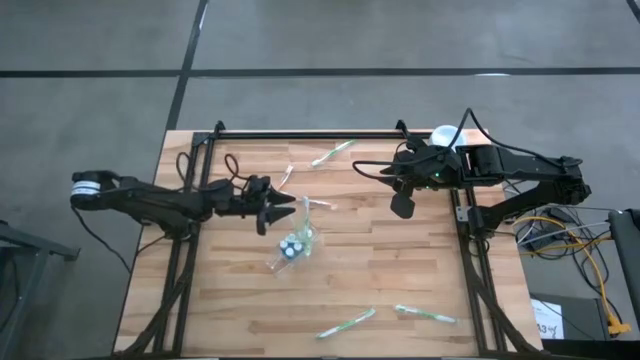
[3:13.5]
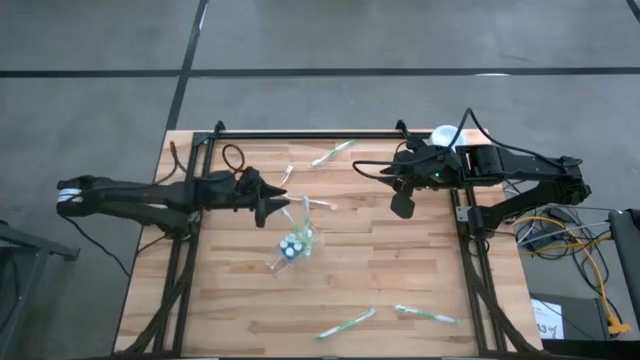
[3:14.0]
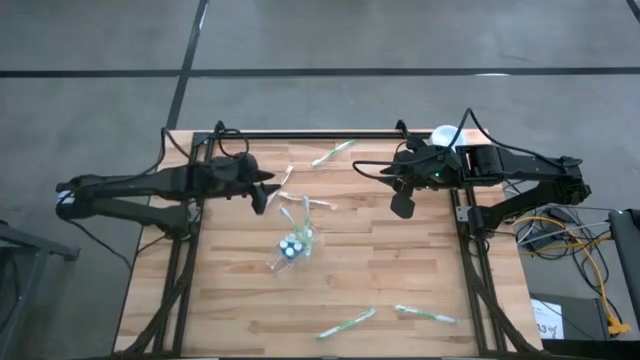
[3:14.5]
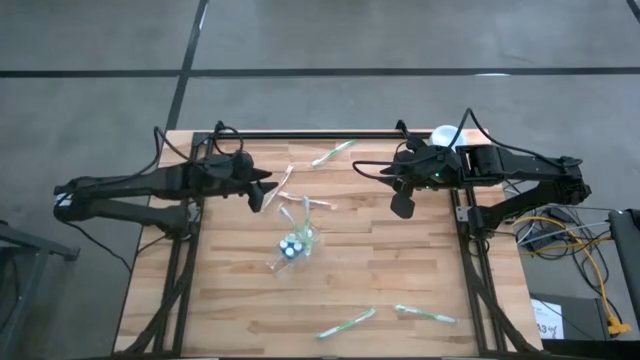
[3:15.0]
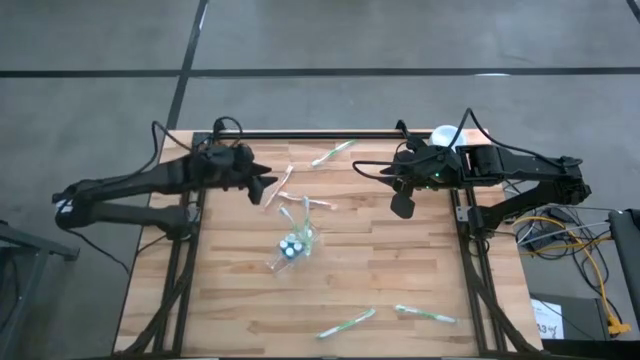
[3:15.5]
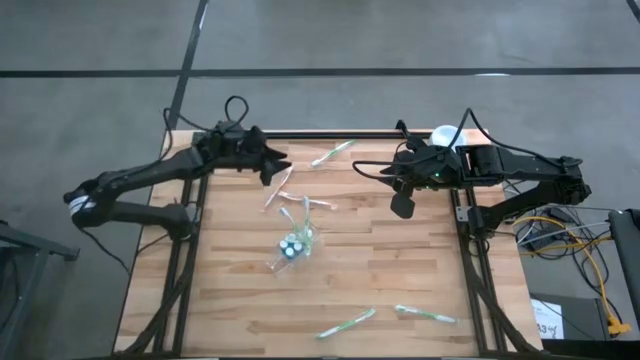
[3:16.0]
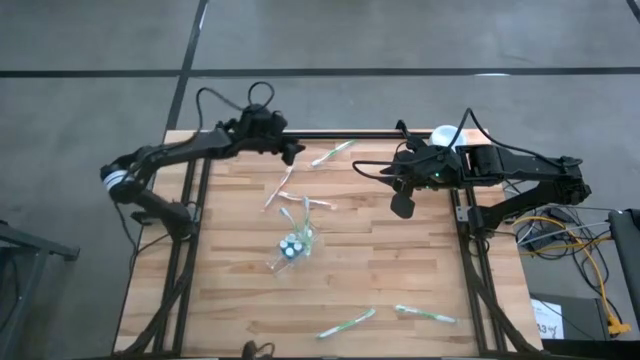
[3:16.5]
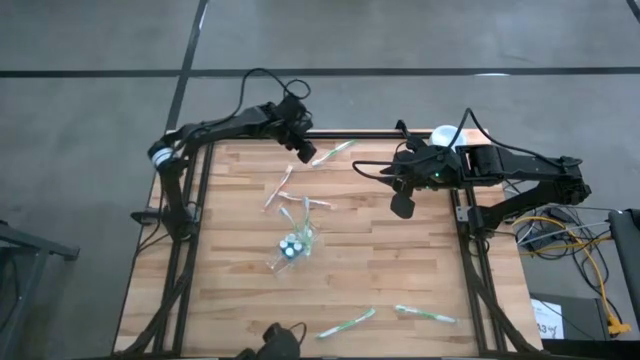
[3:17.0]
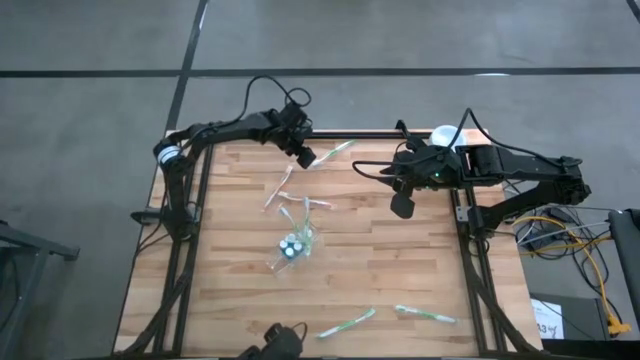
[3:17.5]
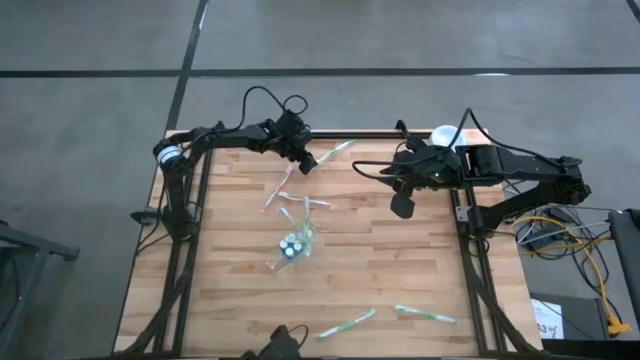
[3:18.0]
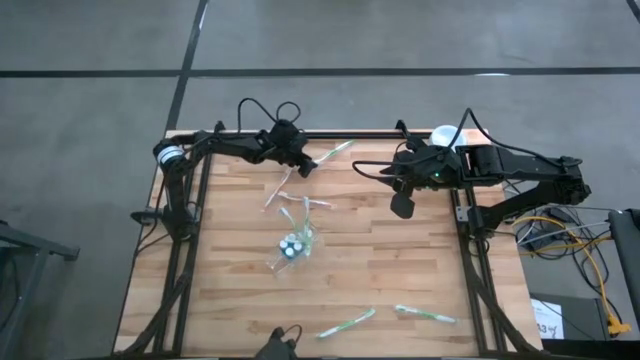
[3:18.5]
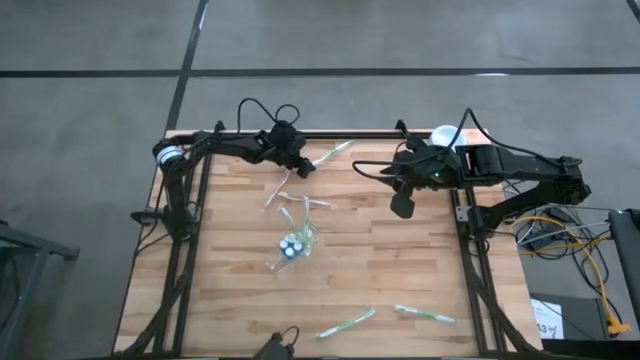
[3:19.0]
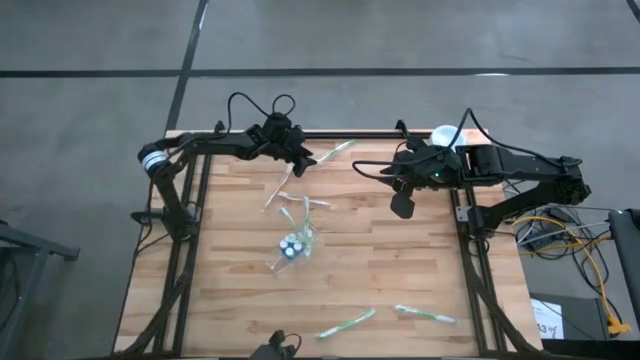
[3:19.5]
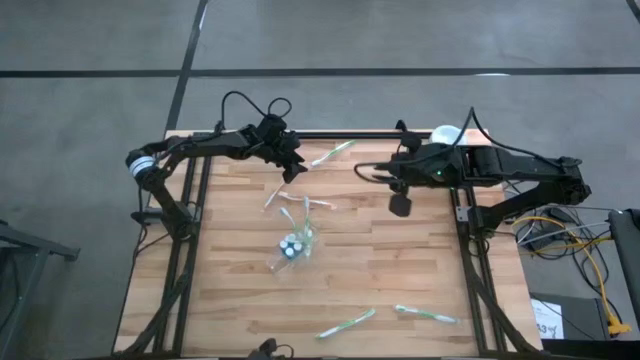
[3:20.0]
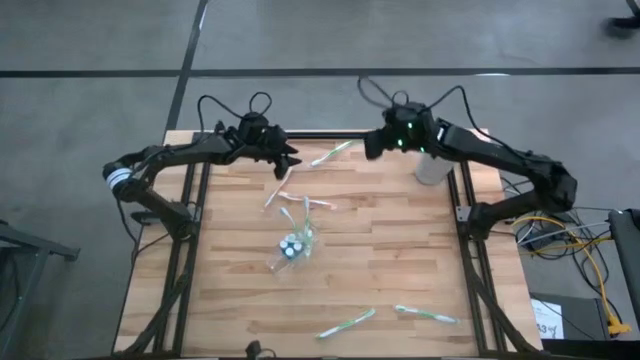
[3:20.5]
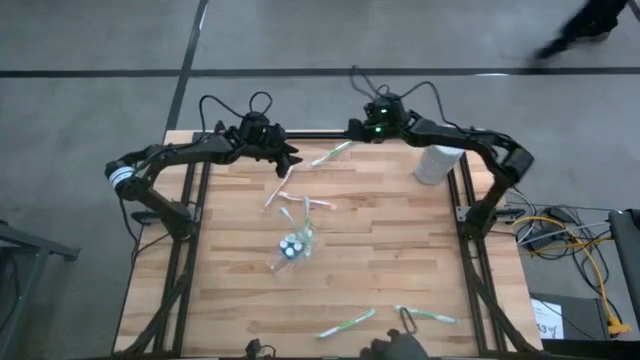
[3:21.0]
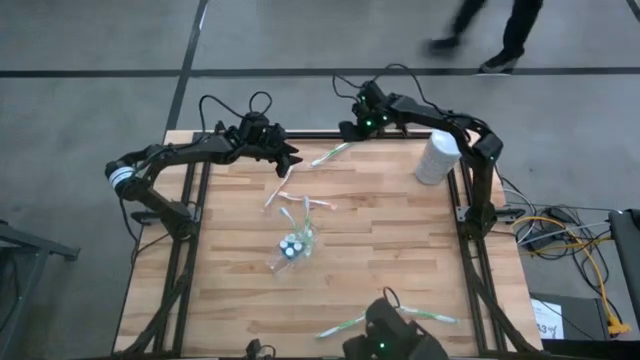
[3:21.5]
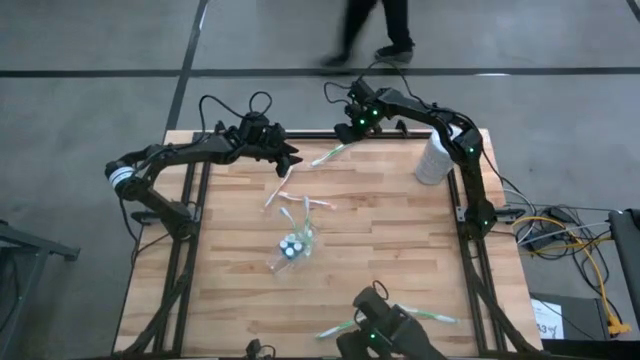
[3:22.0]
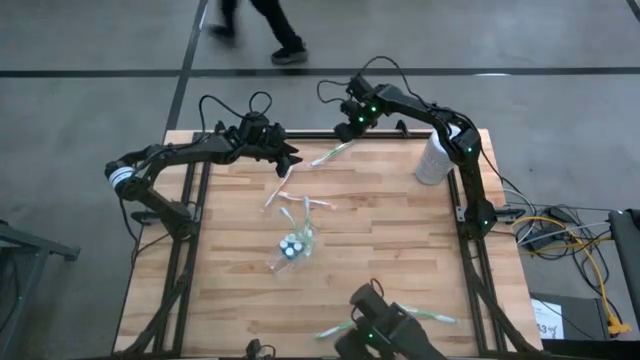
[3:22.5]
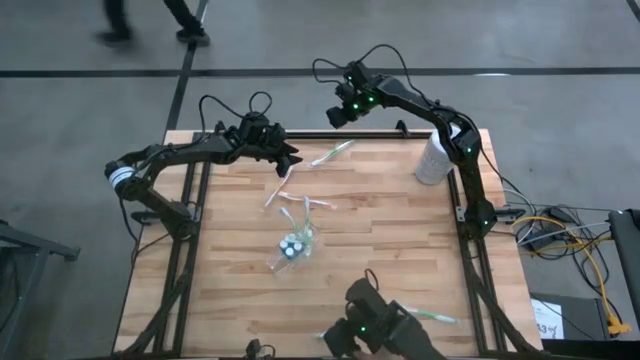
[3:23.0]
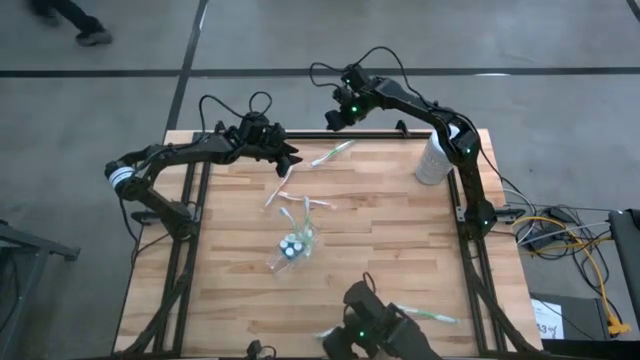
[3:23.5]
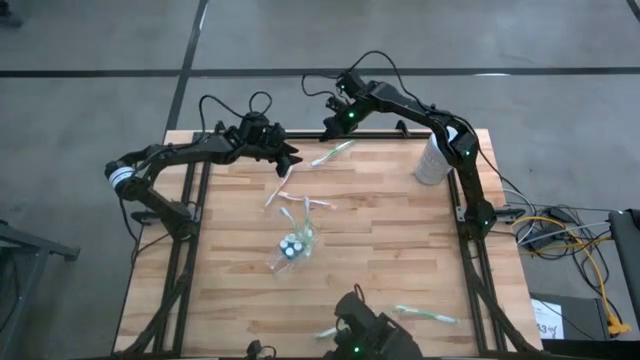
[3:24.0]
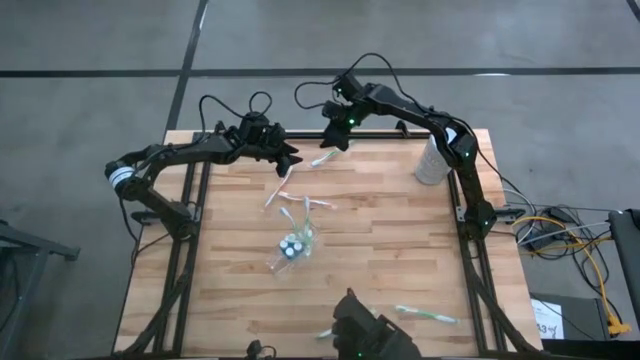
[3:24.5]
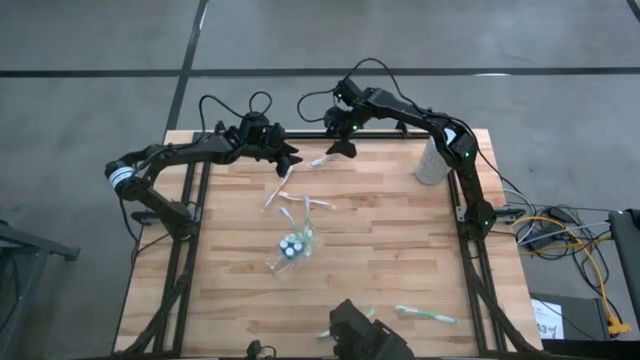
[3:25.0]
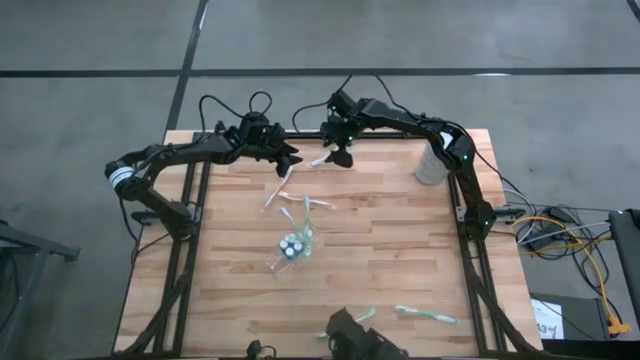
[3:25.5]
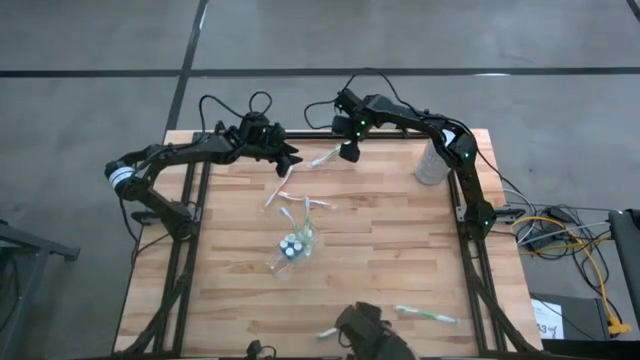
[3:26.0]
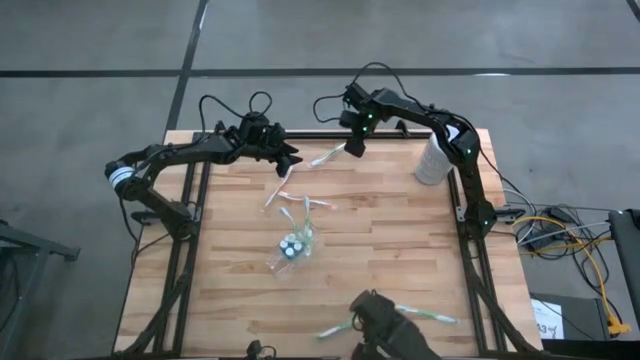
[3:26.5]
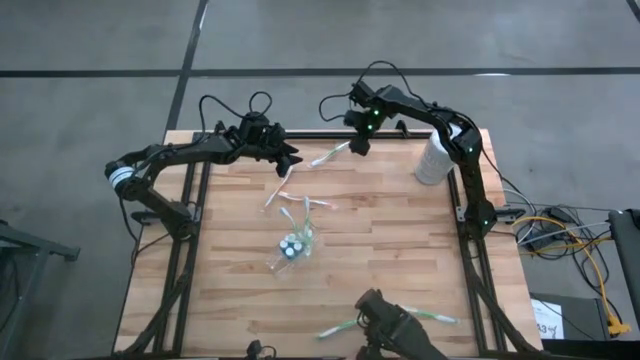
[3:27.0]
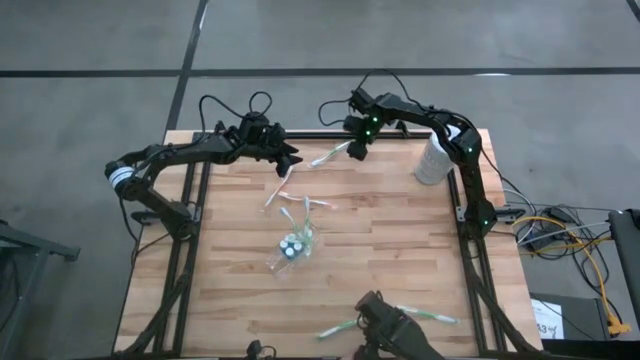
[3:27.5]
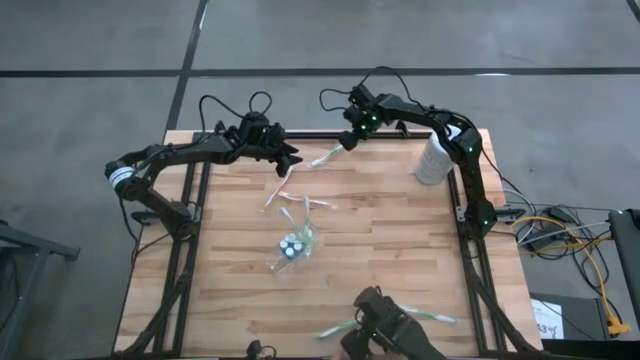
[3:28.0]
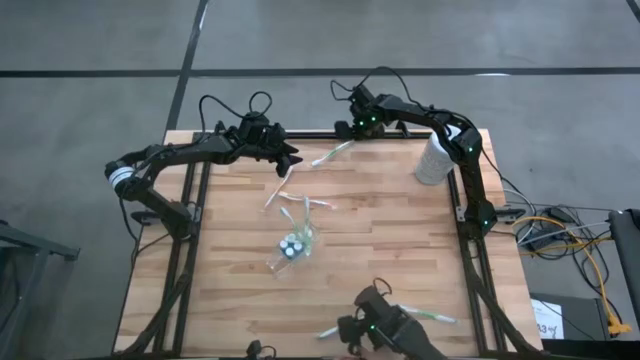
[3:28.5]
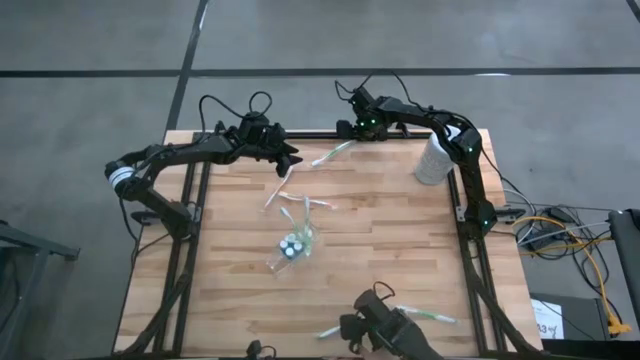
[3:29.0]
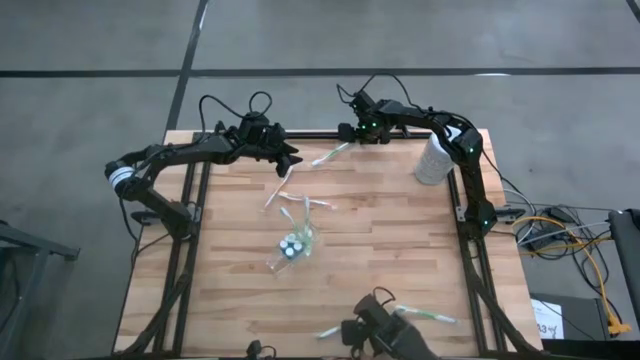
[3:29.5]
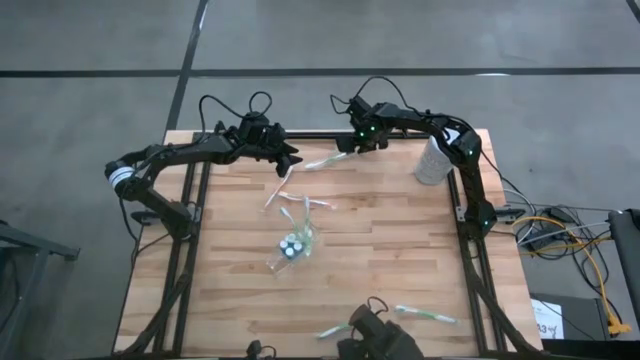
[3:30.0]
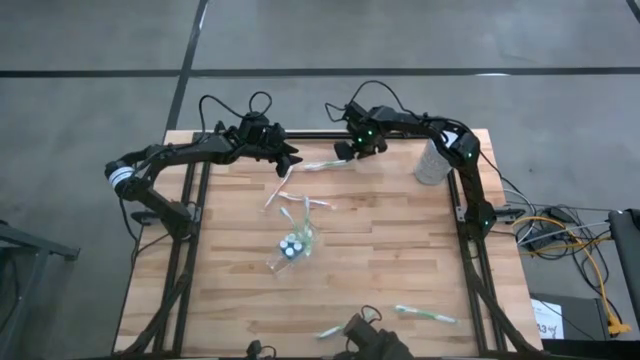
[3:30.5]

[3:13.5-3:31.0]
Task: Pick & Place toothbrushing station
Put the green toothbrush into the transparent organizer

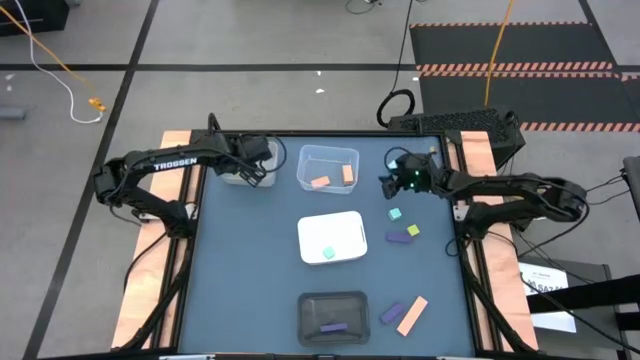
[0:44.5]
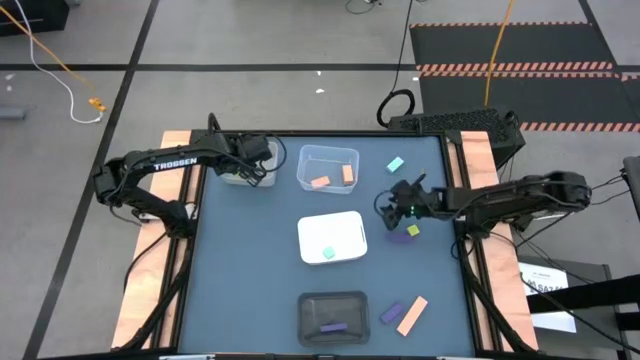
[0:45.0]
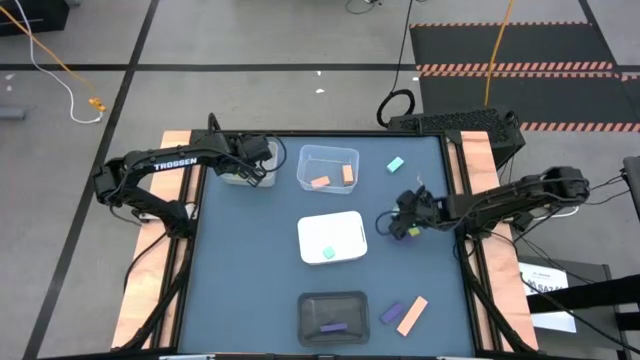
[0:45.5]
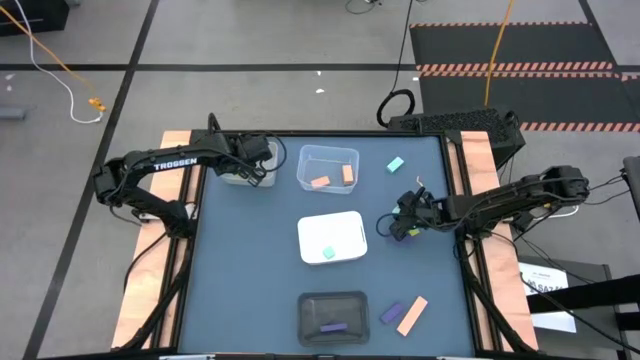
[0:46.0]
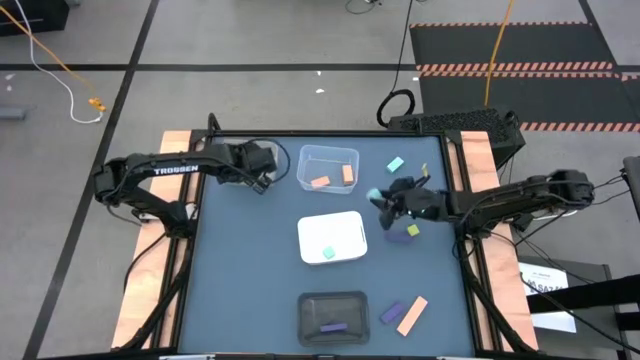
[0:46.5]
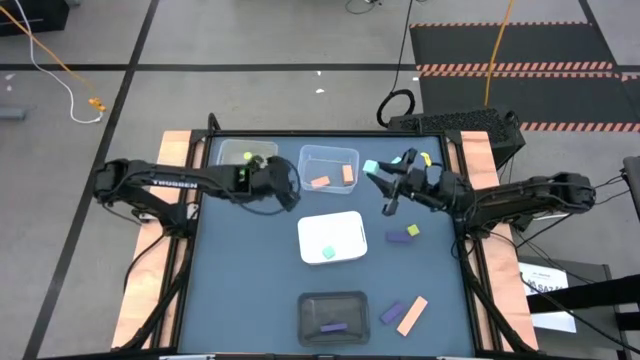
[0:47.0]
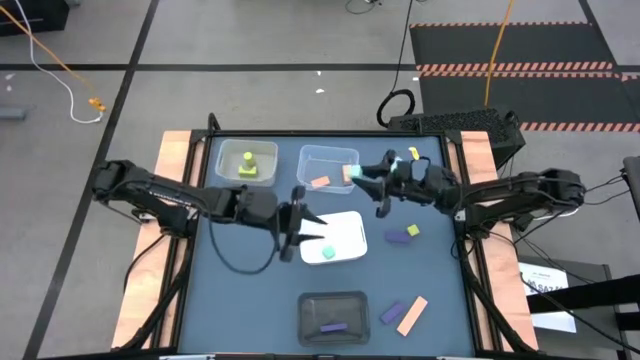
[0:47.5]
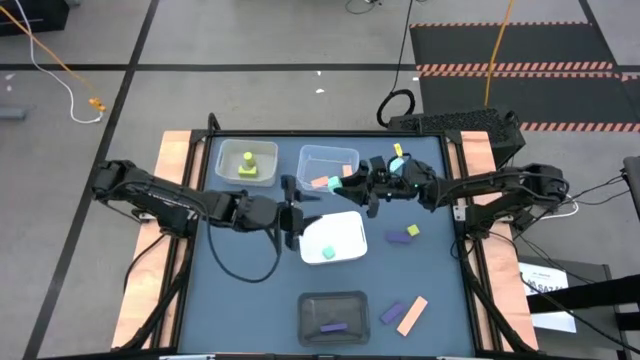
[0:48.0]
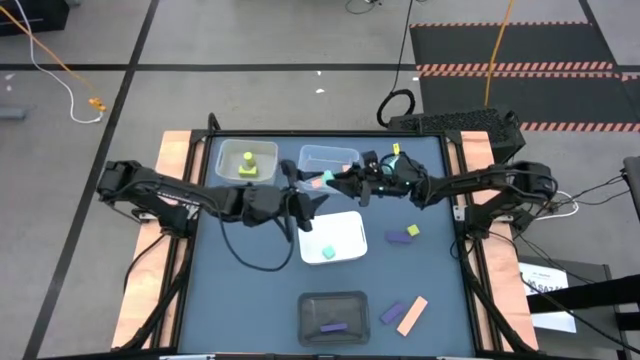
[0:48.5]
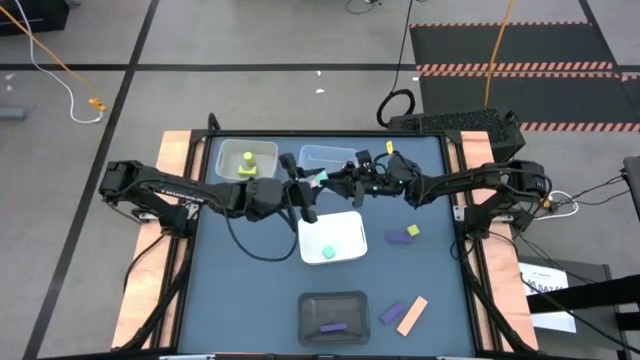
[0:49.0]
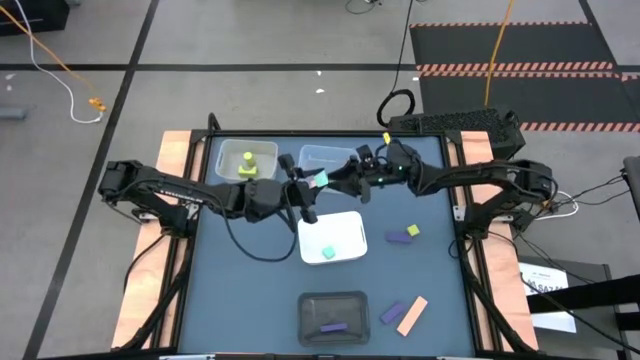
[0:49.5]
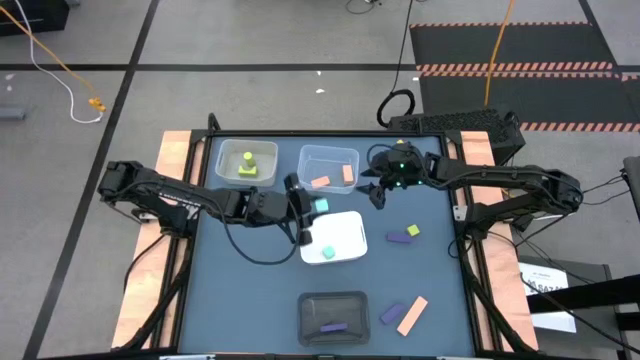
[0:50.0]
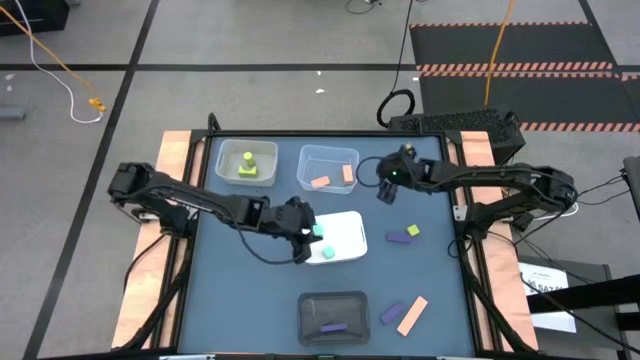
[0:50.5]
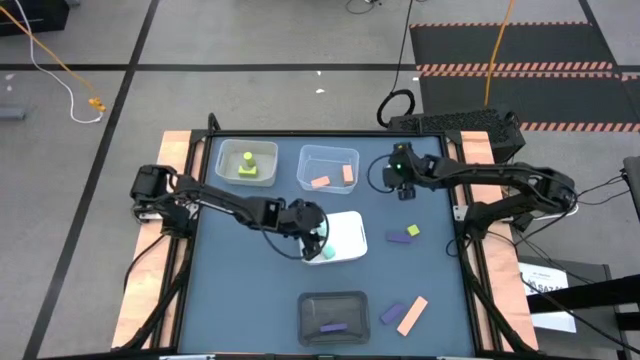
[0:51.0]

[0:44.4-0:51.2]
Task: Sort & place blocks by color
Put the bottom light blue block into the white bin
